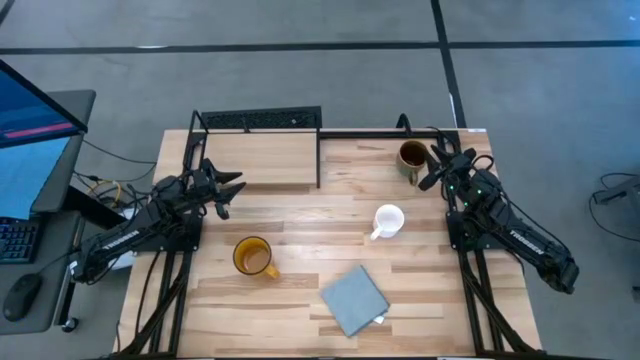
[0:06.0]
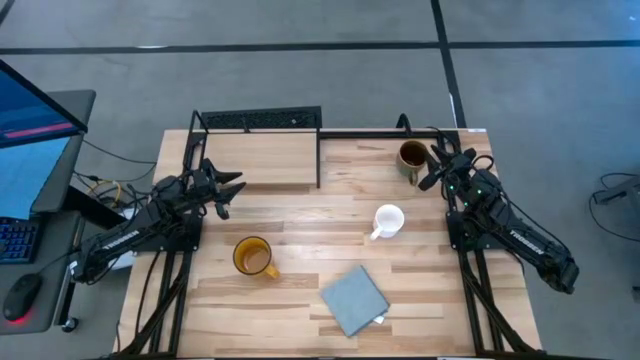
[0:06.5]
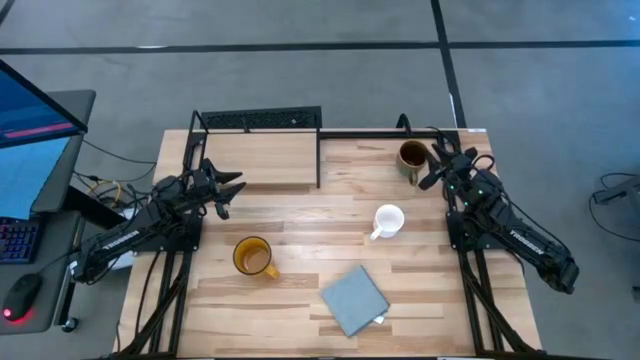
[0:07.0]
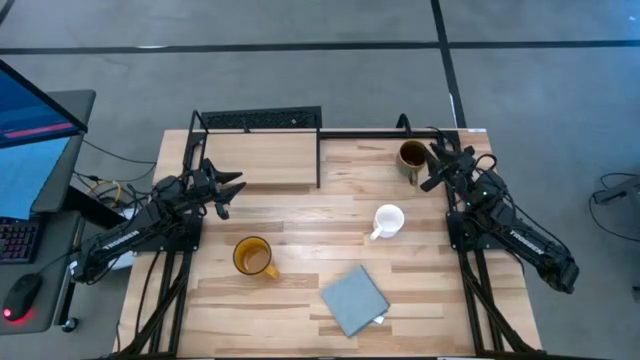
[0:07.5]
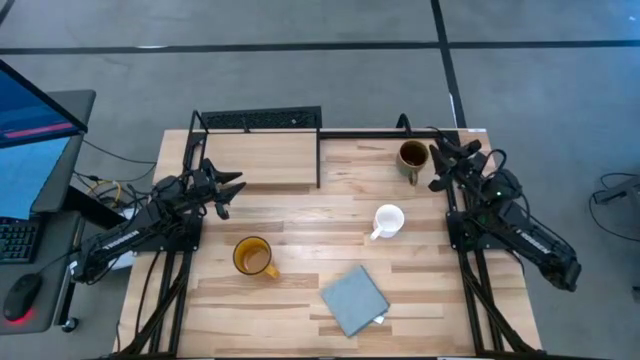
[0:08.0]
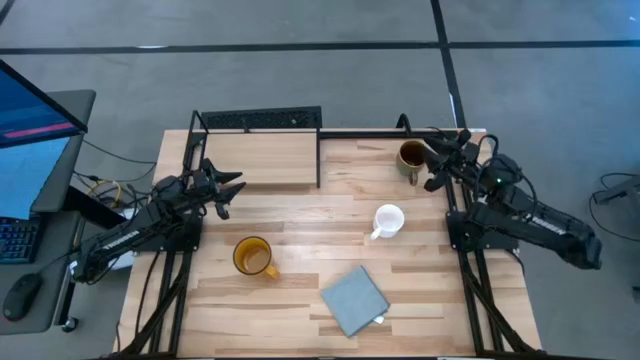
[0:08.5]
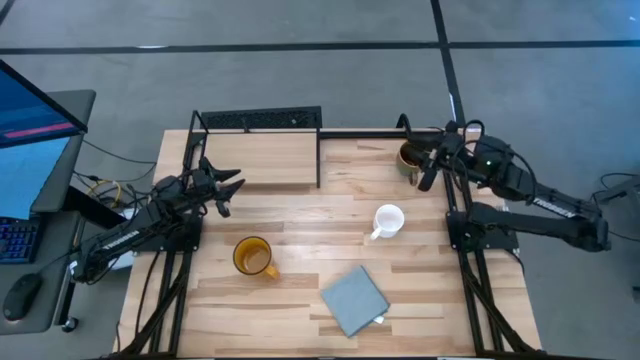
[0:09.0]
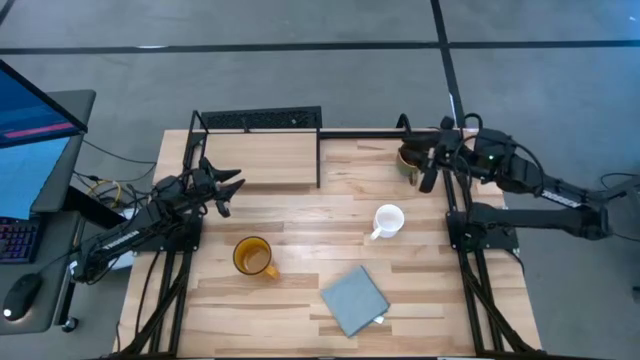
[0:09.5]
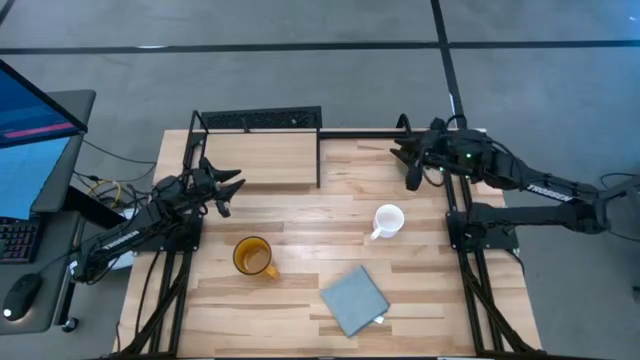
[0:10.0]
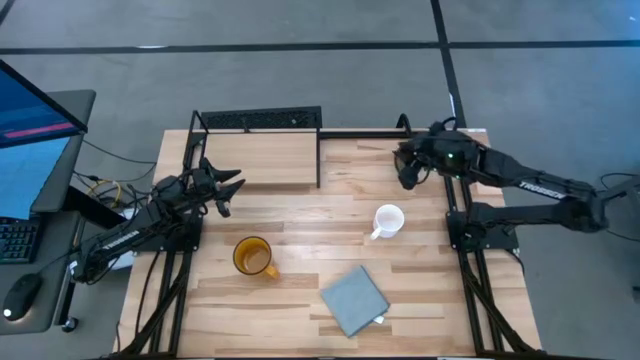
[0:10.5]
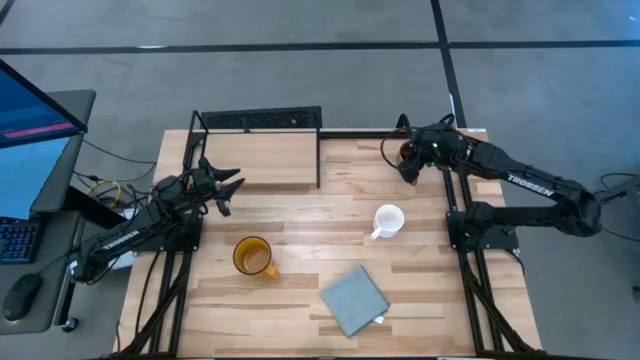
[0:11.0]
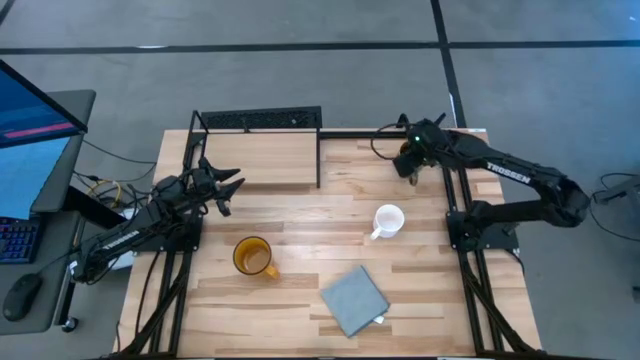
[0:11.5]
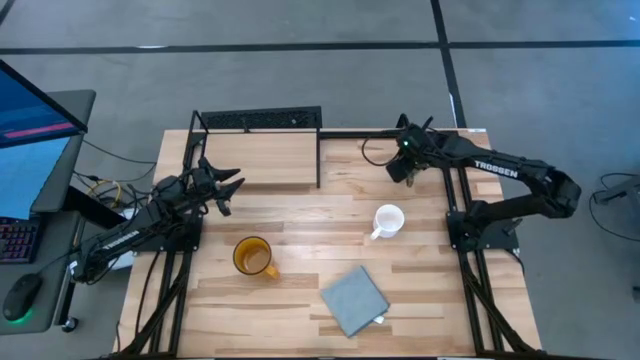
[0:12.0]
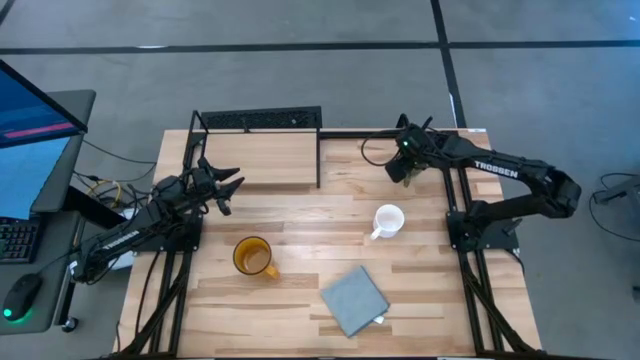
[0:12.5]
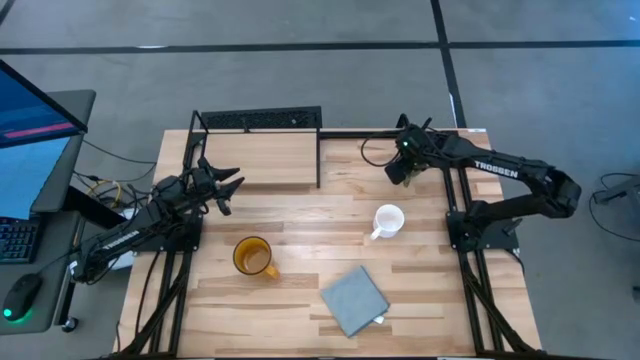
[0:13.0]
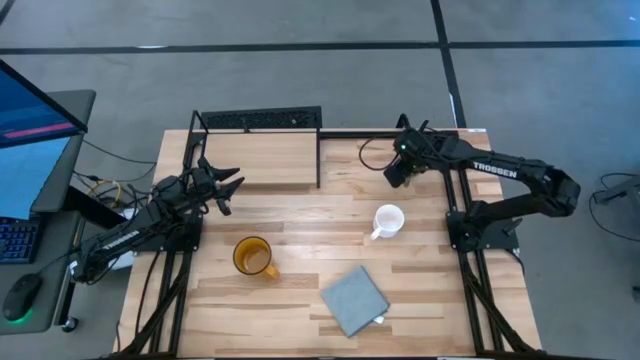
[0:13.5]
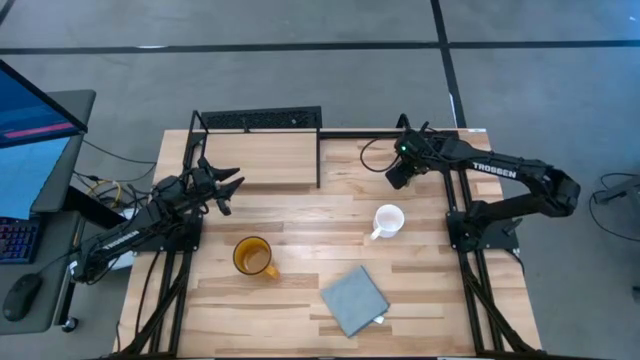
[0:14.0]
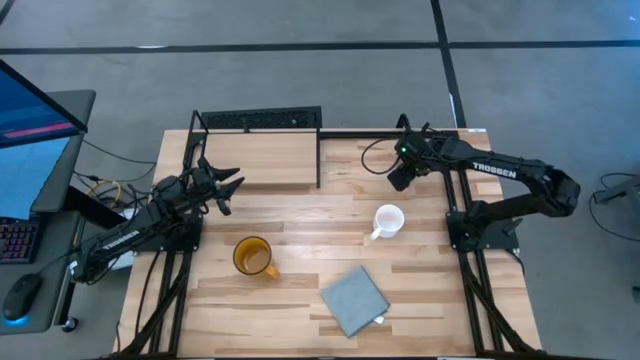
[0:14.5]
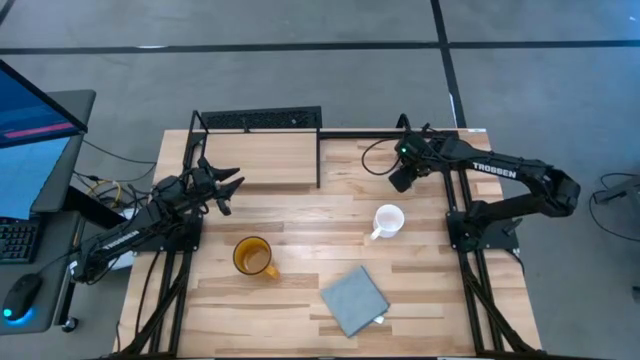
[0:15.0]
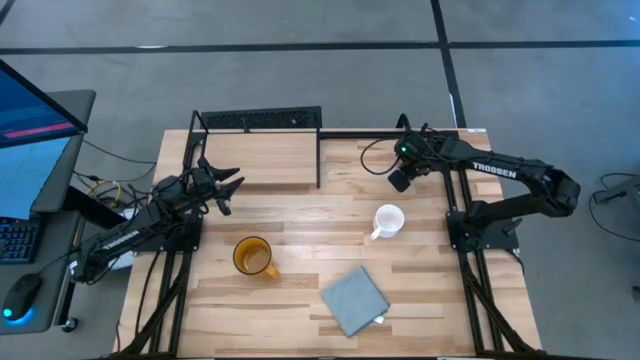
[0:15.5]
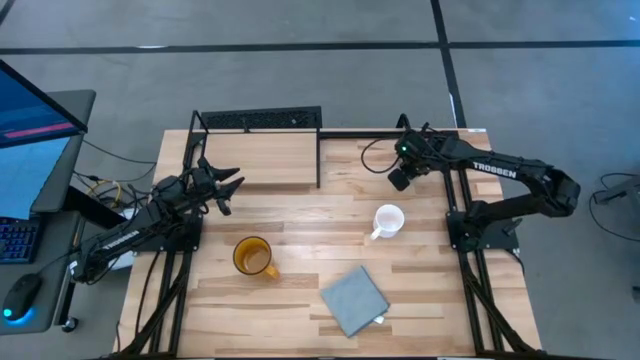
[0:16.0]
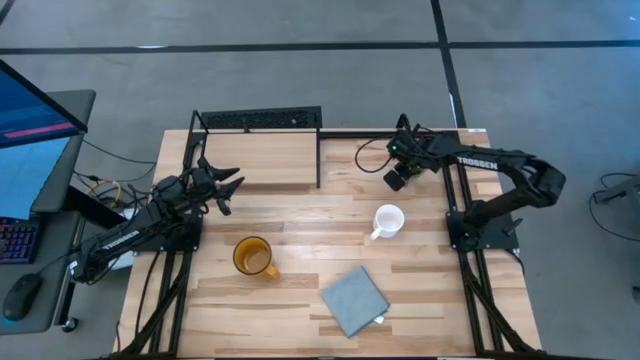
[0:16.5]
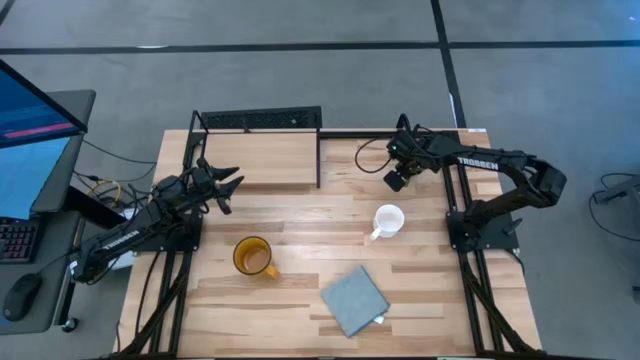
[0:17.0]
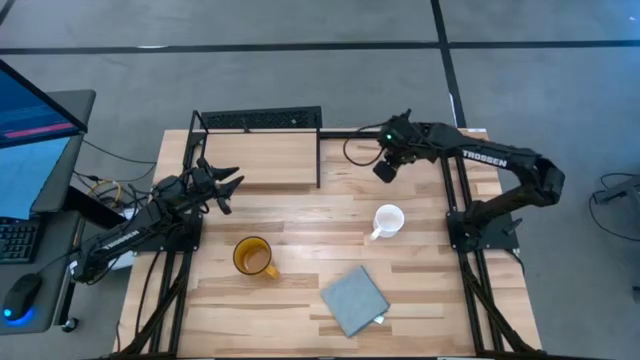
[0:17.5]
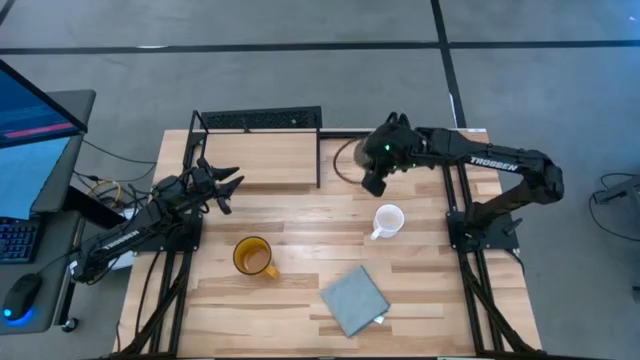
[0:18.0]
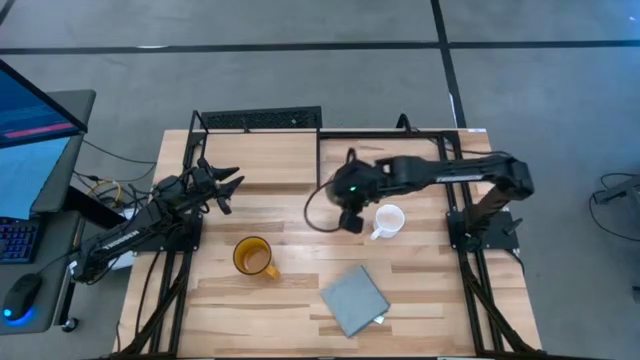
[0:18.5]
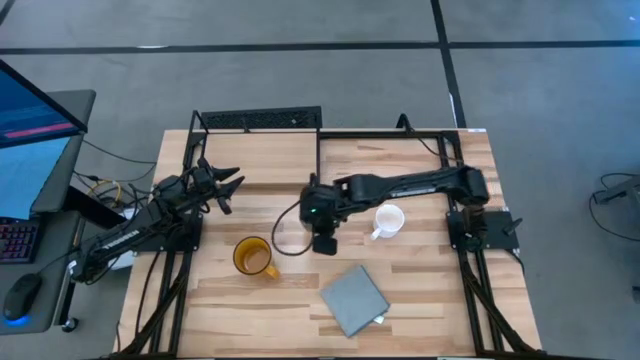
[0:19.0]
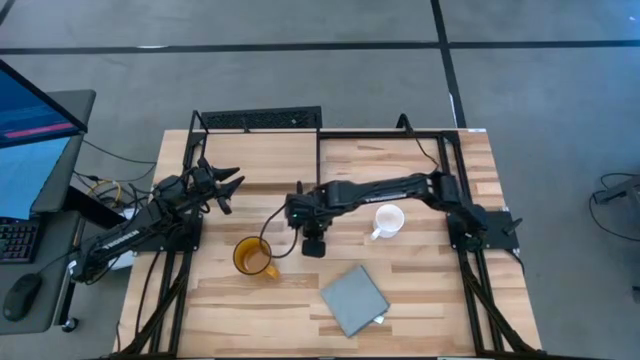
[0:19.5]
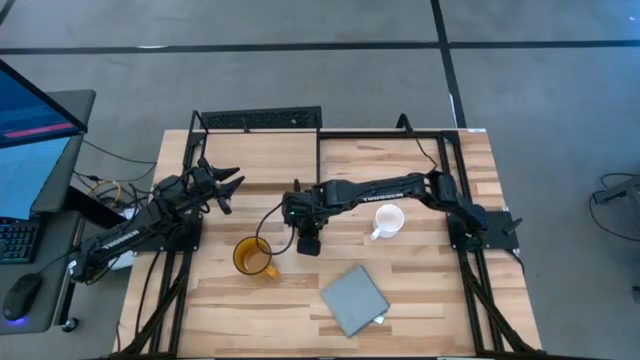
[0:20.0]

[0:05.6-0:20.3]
Task: Stack small to large cups/mugs on shelf
Put the green mug on the shelf

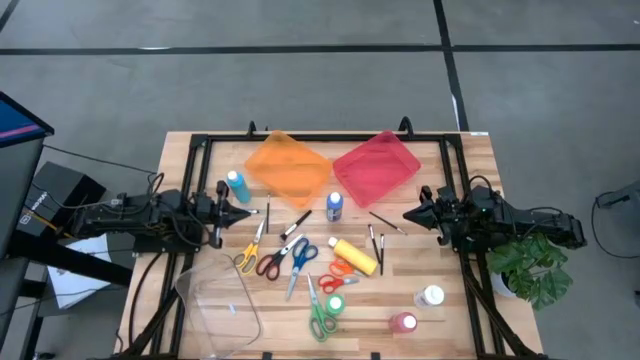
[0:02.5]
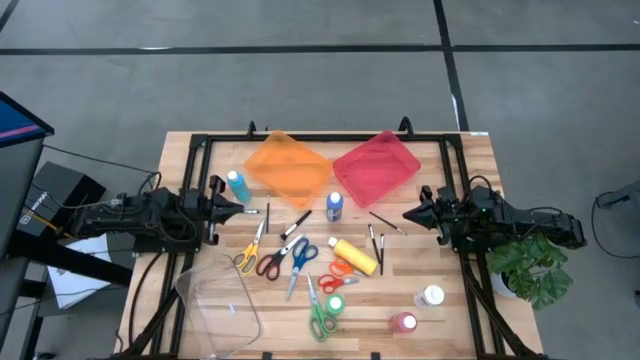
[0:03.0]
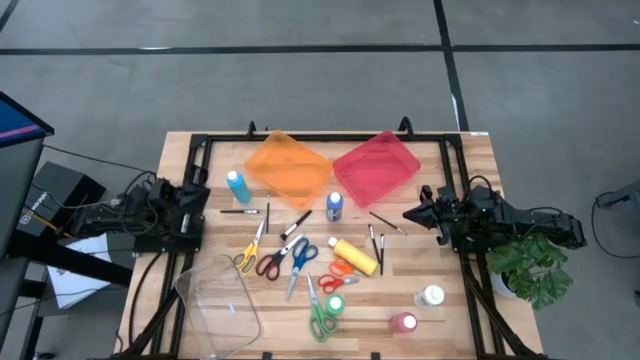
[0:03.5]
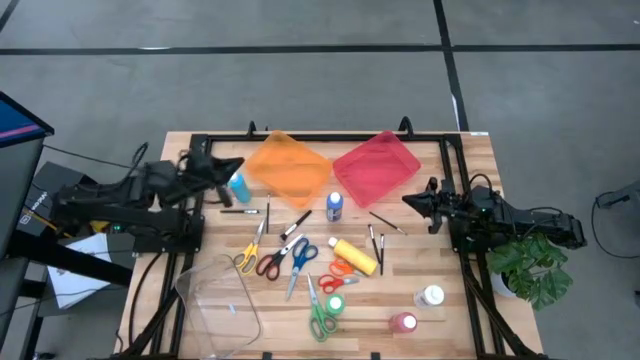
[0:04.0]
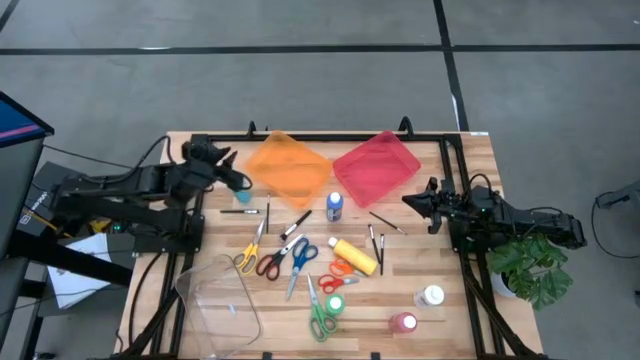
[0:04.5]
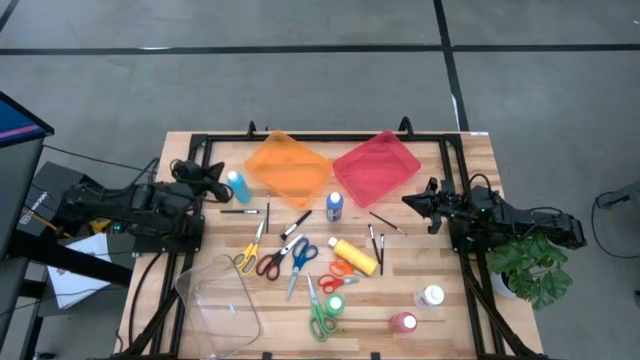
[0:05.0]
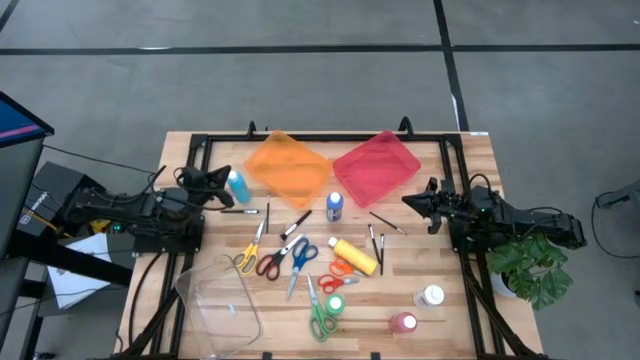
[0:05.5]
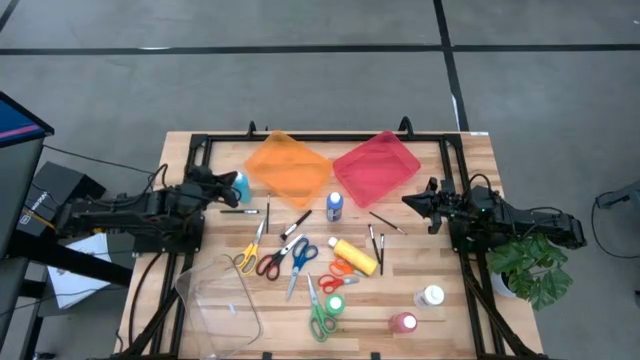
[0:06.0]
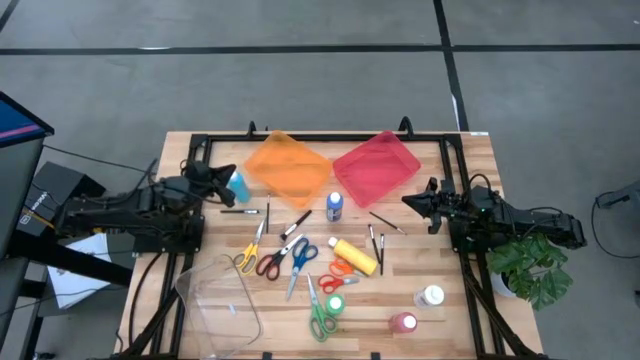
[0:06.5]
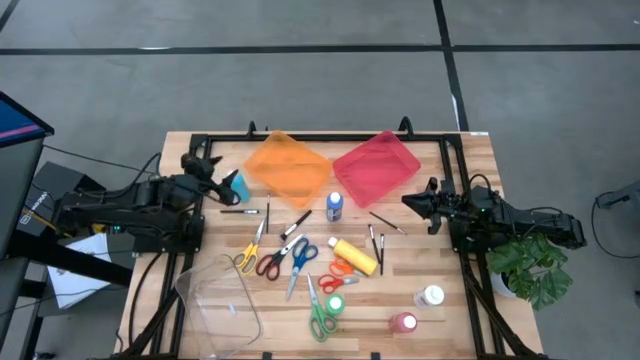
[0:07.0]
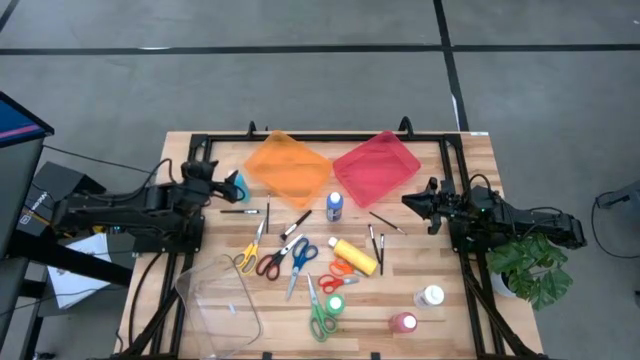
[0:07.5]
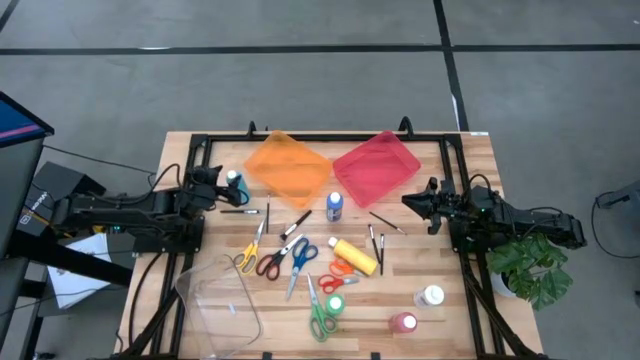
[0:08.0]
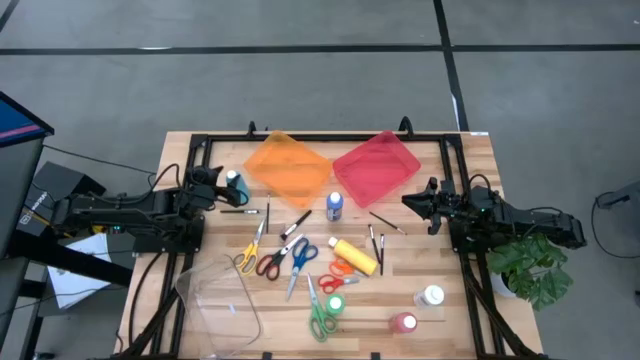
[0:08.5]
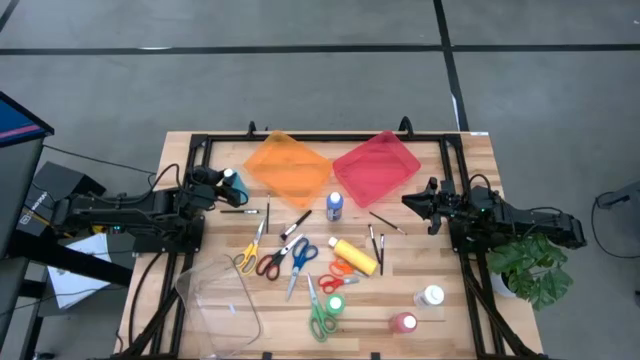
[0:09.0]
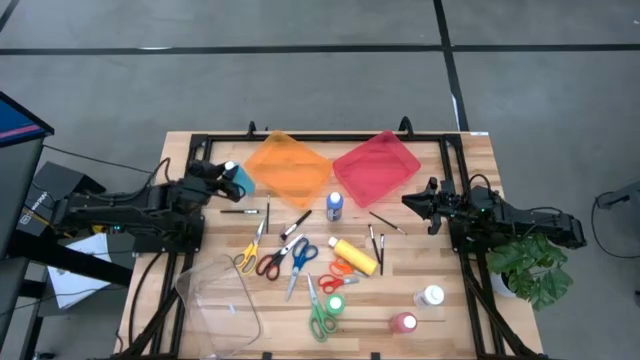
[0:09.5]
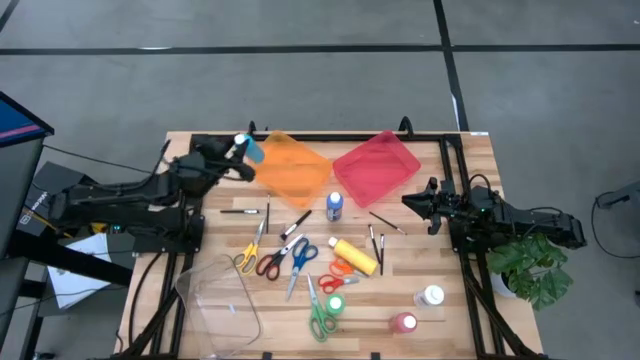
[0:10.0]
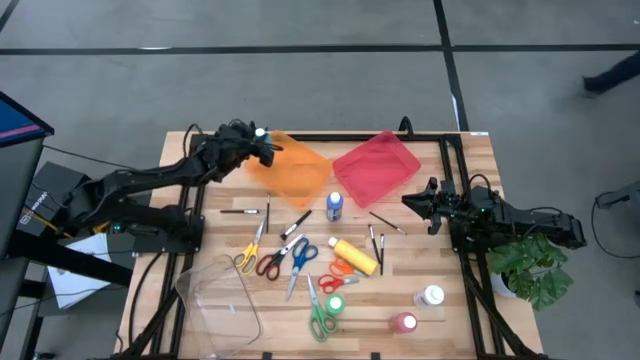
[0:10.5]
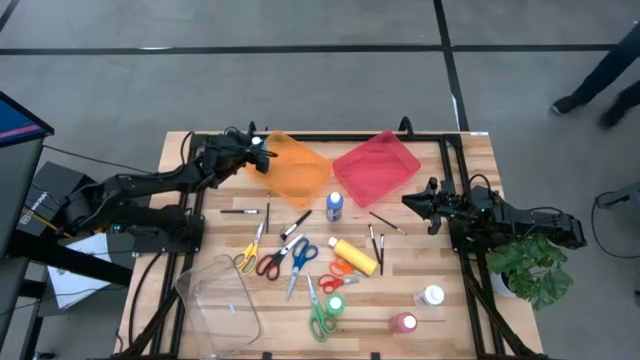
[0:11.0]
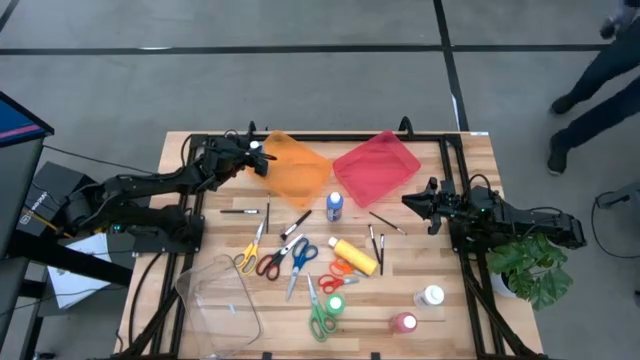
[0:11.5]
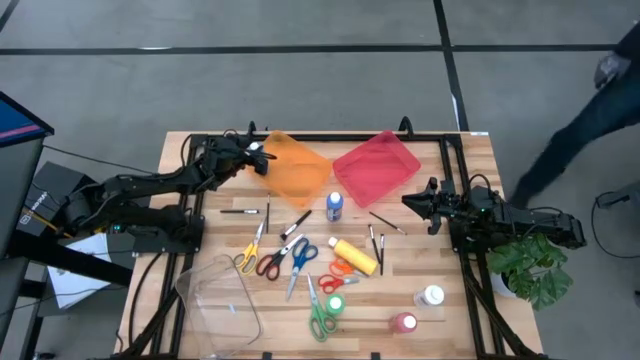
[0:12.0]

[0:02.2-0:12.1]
Task: Pick & Place Paint Supplies
Put the light blue paint bottle into the orange bin
